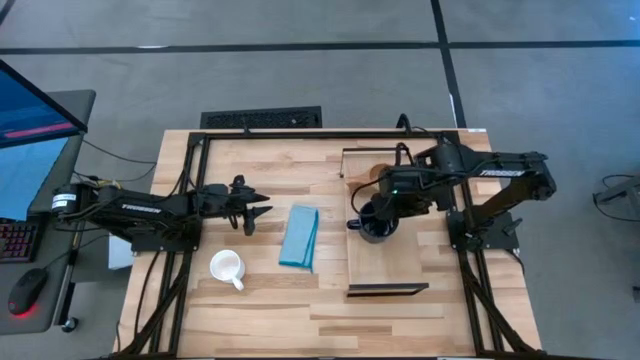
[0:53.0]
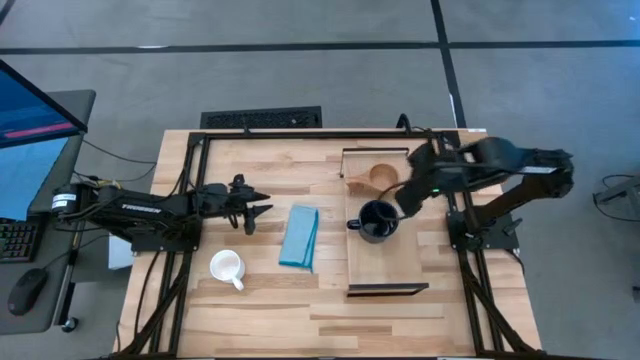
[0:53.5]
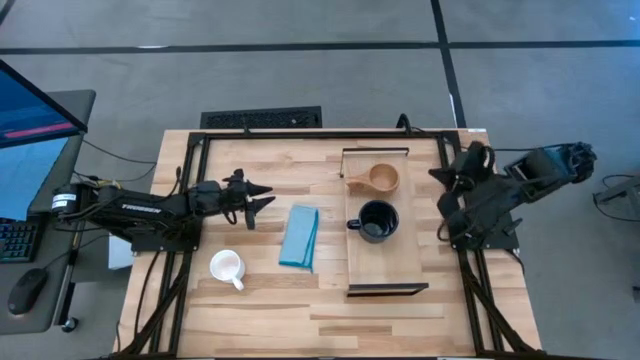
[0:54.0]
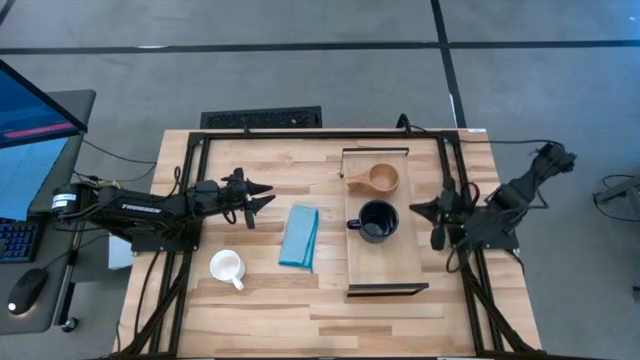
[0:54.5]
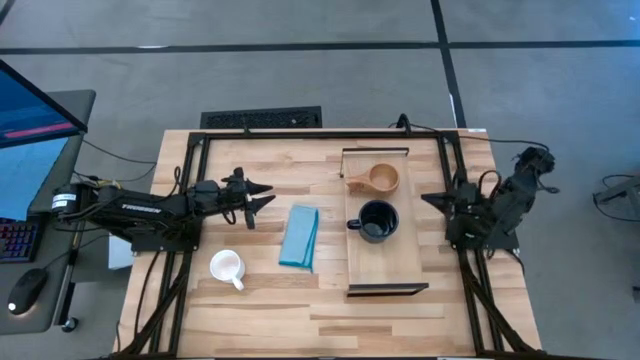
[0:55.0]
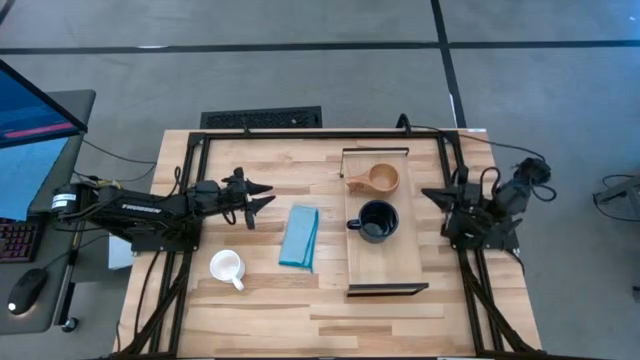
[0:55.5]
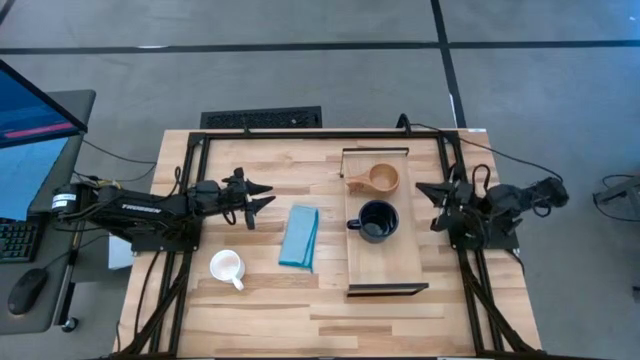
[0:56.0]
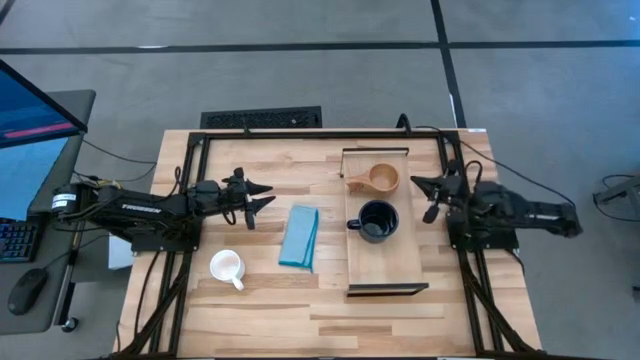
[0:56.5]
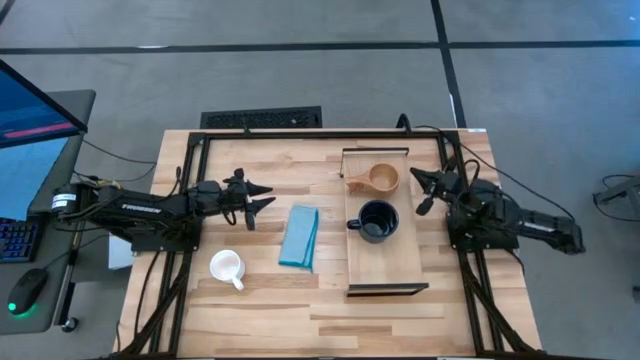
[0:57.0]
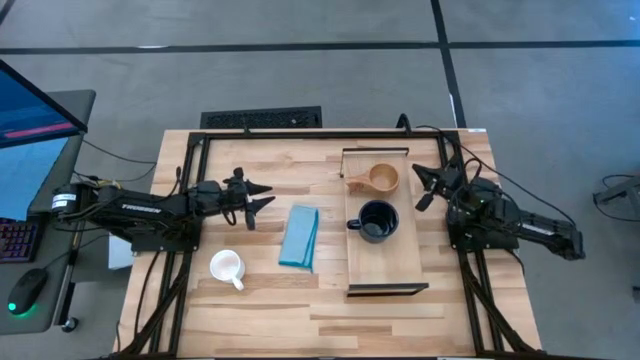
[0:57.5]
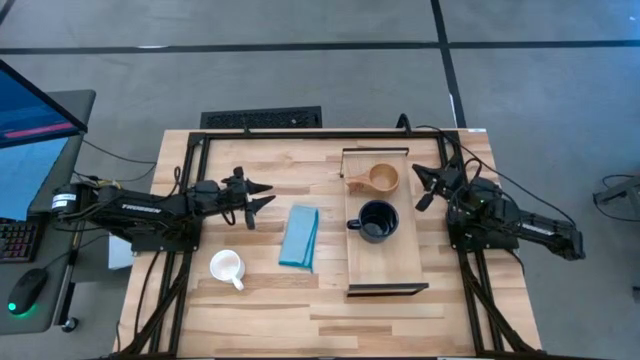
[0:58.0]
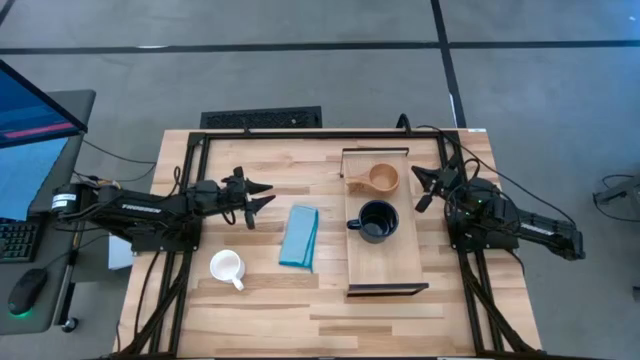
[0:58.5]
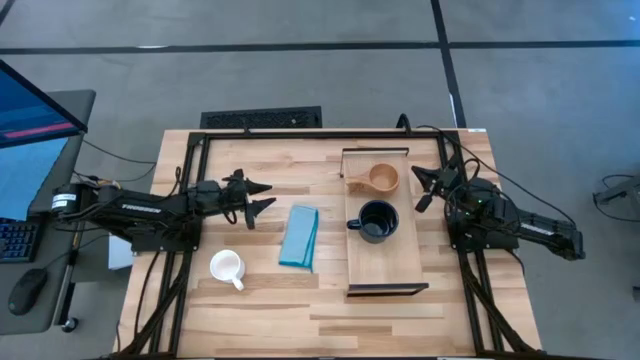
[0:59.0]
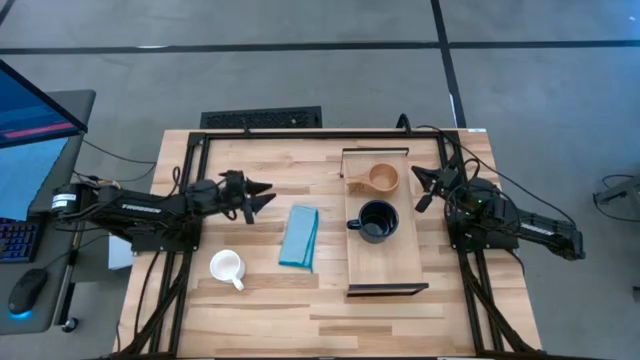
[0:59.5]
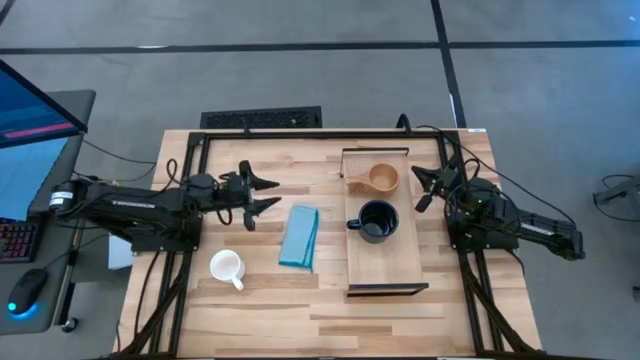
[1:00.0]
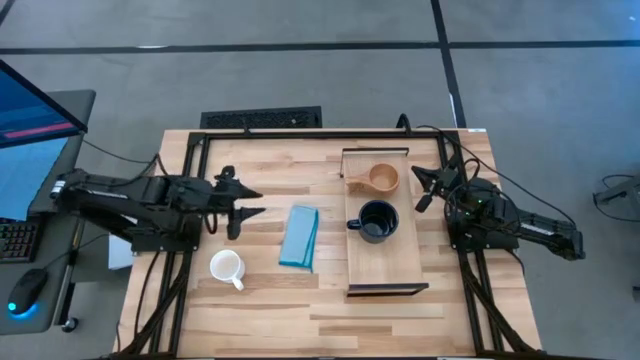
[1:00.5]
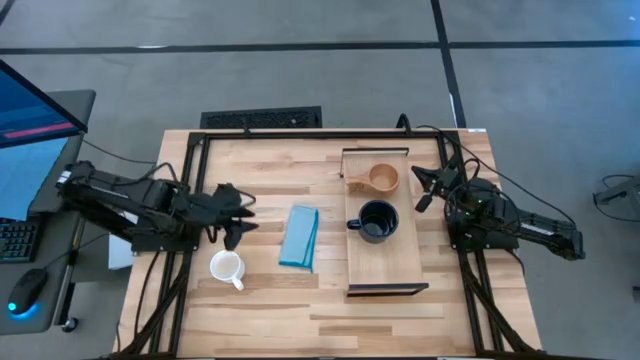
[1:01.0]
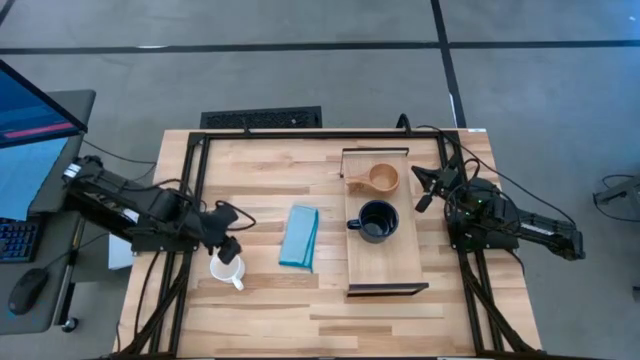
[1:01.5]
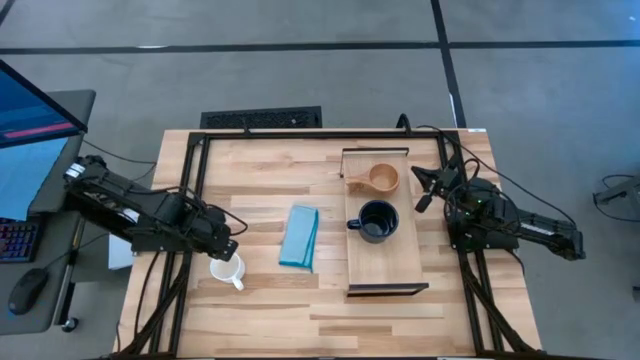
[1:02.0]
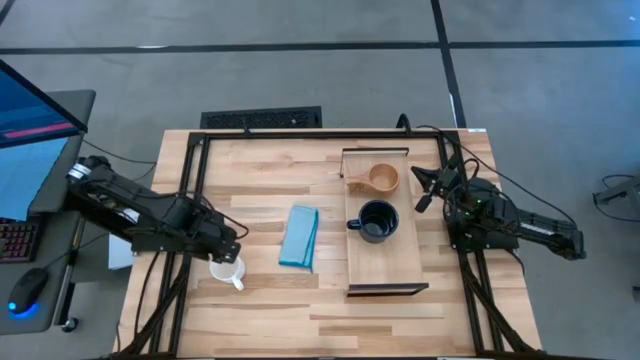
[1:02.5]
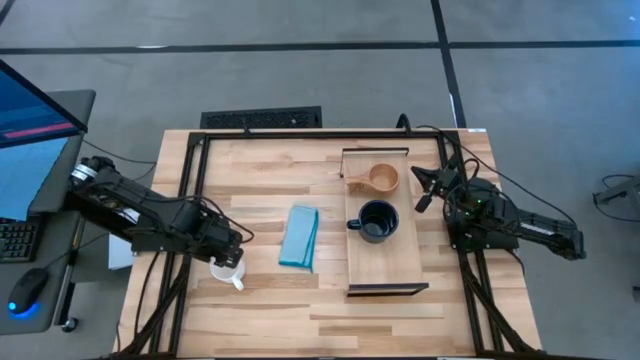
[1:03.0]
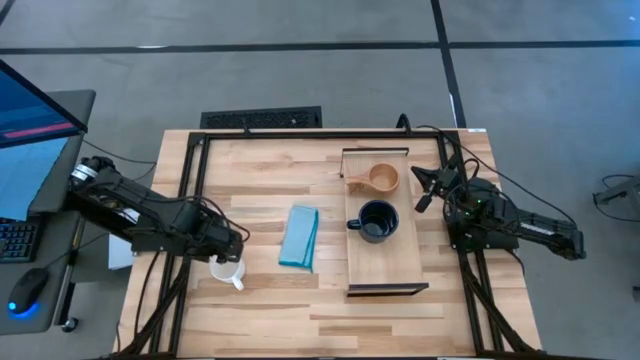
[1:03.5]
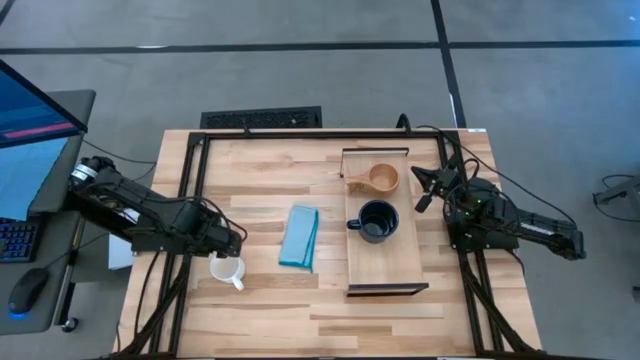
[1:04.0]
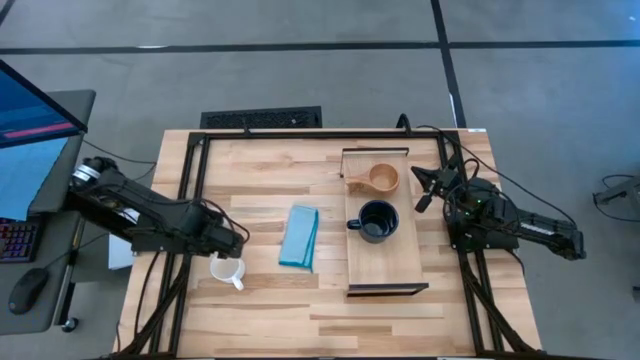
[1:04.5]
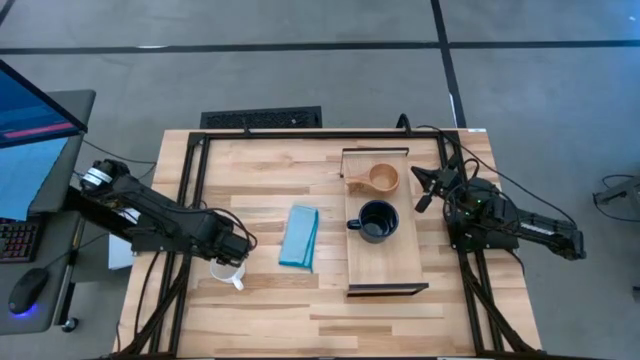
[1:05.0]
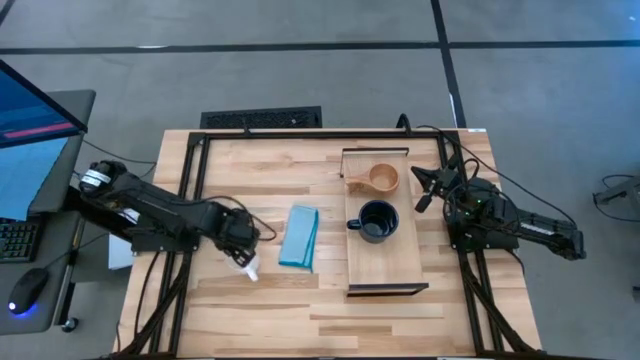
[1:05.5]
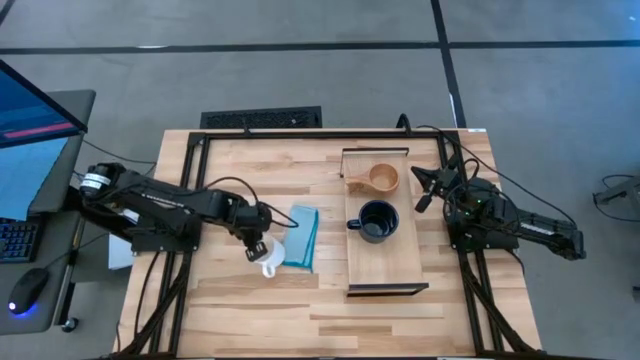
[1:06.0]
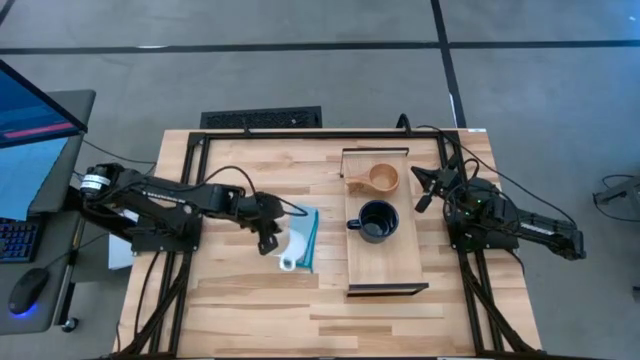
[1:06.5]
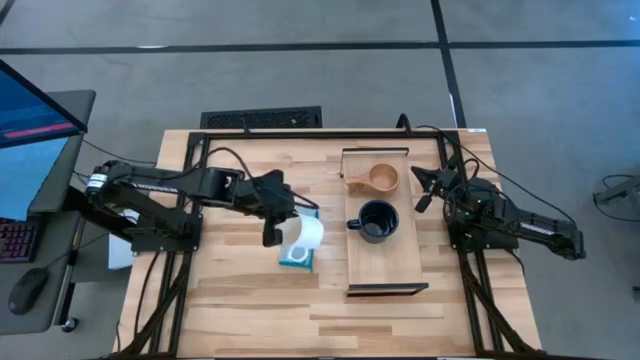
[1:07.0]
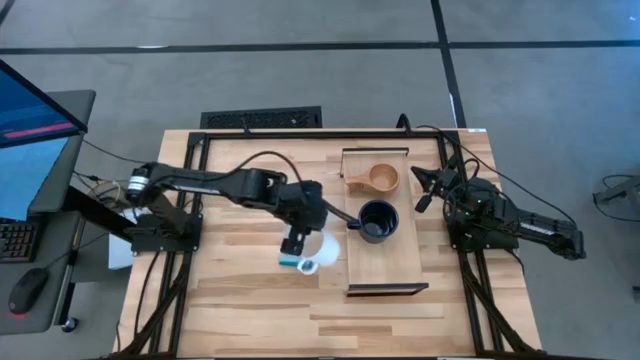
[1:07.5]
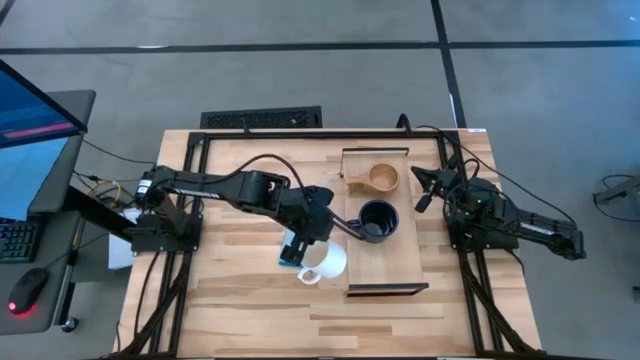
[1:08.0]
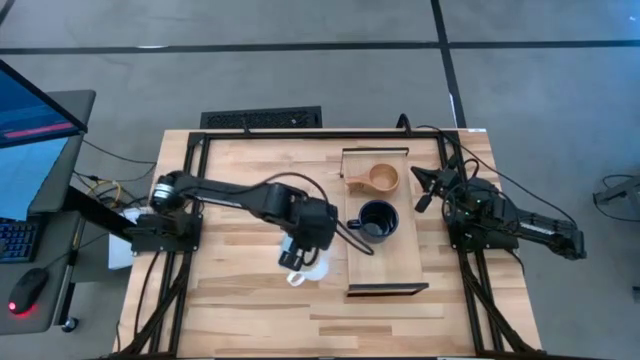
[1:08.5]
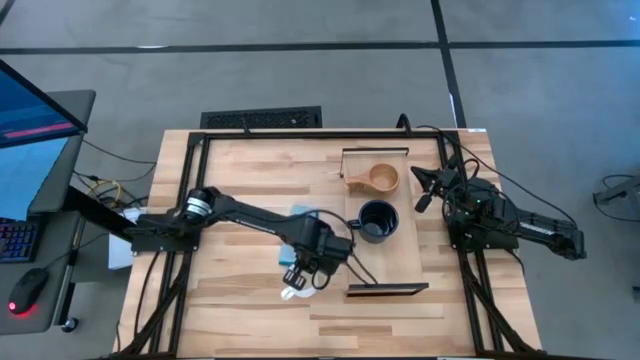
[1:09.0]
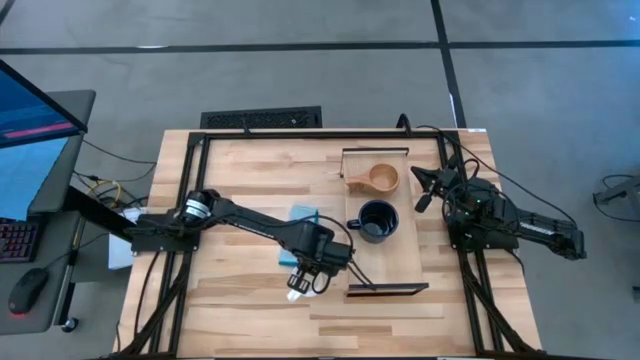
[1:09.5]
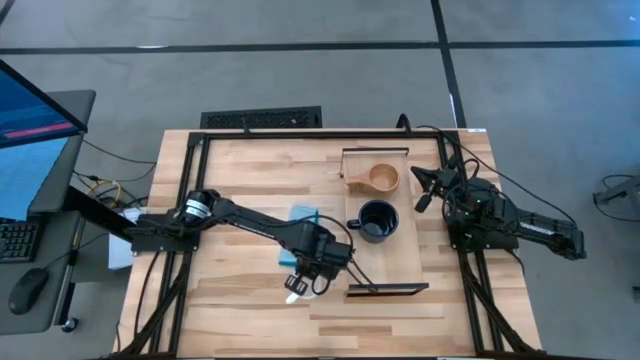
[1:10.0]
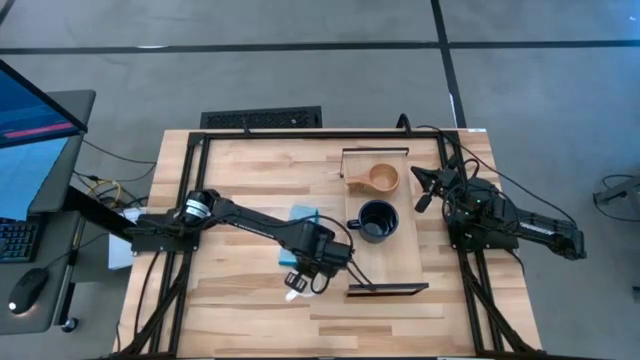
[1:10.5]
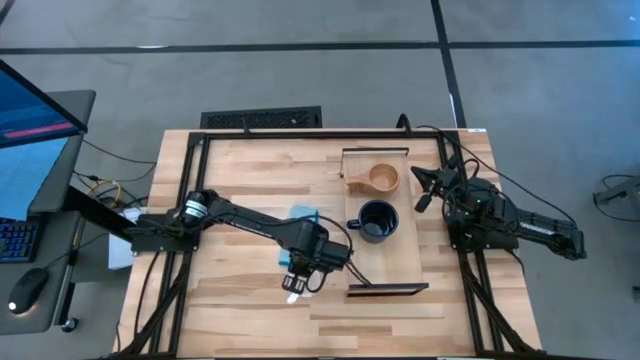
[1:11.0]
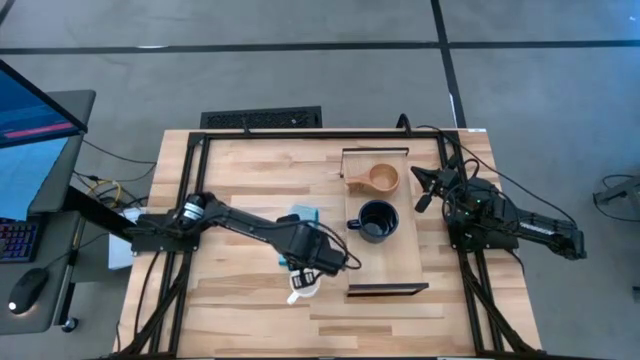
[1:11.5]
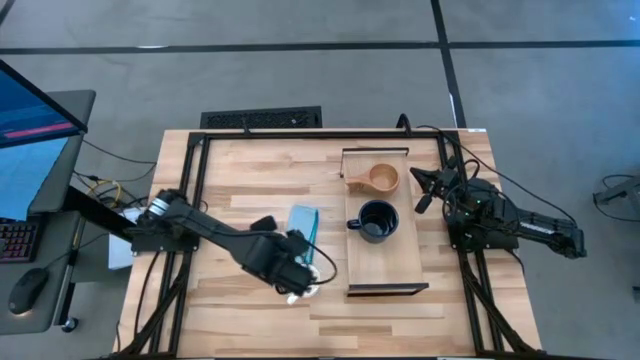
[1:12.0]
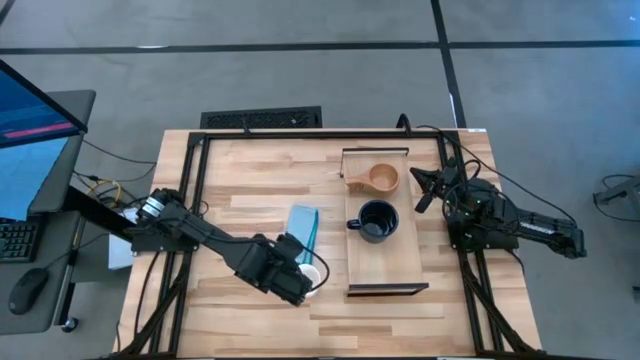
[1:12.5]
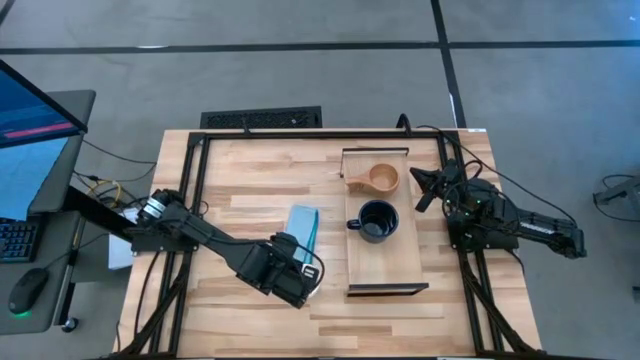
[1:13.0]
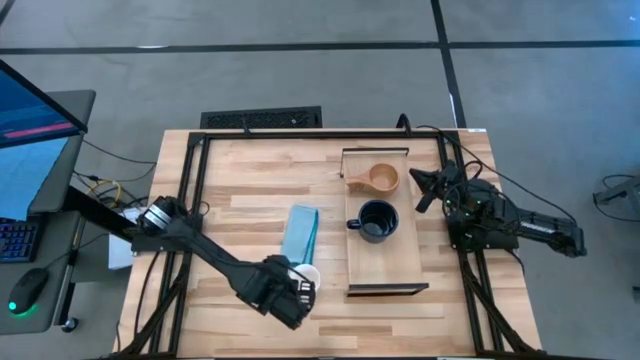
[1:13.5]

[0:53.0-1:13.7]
Task: Stack small to large cups/mugs on shelf
Put the white mug on the shelf
